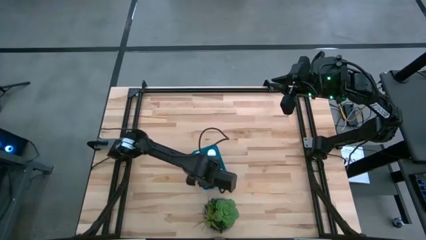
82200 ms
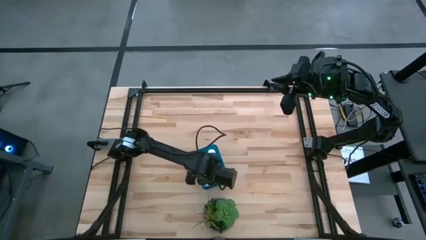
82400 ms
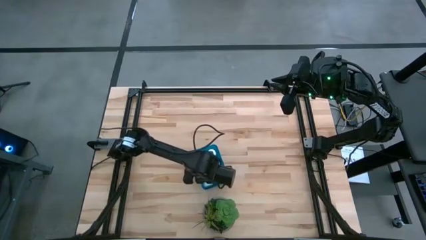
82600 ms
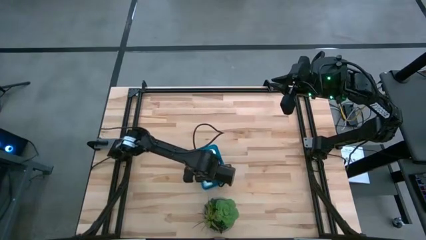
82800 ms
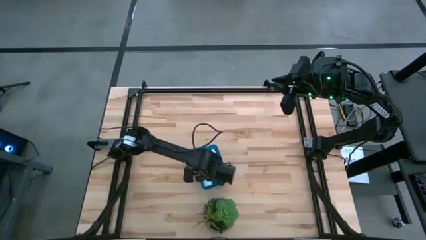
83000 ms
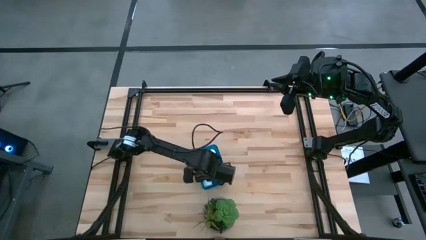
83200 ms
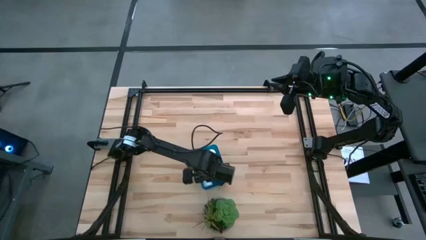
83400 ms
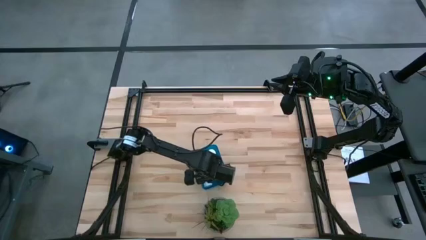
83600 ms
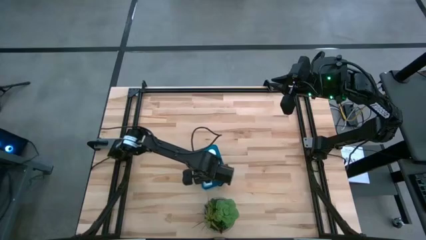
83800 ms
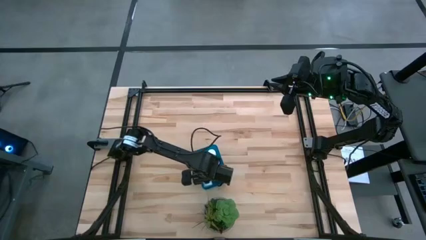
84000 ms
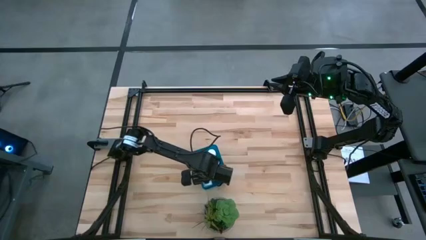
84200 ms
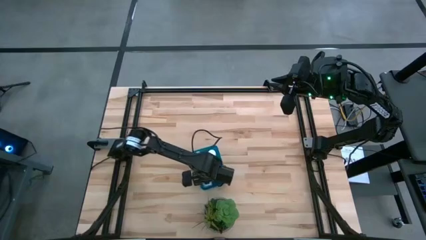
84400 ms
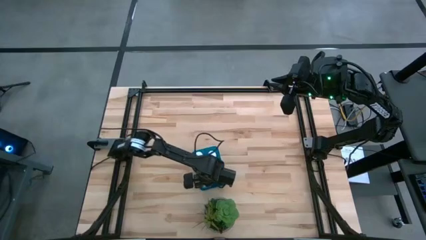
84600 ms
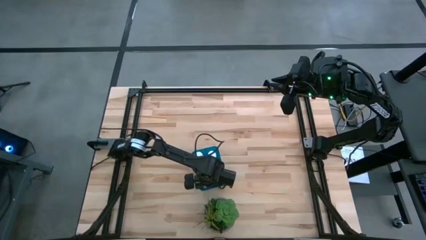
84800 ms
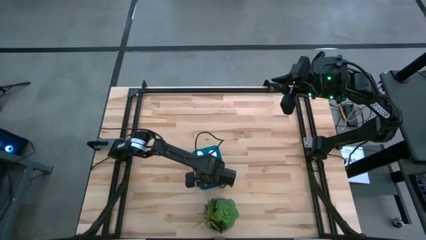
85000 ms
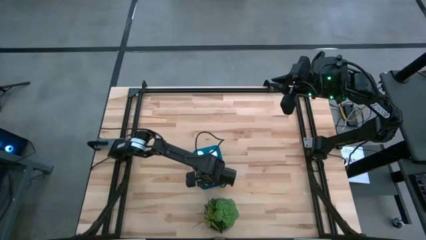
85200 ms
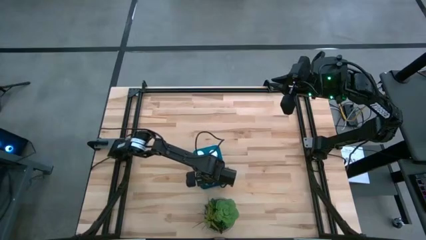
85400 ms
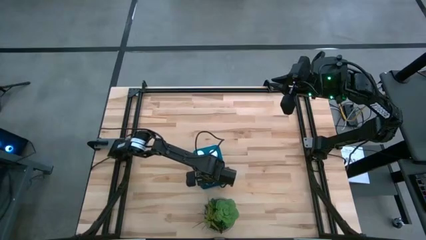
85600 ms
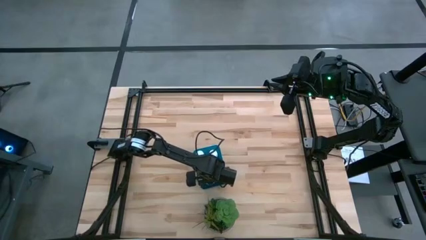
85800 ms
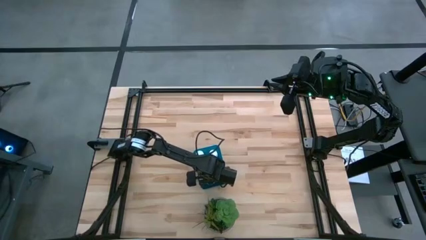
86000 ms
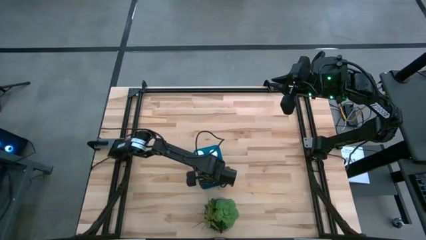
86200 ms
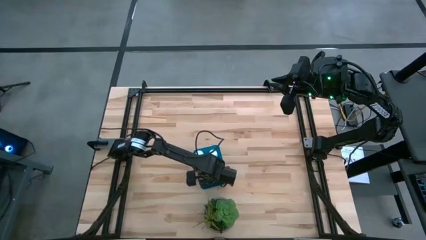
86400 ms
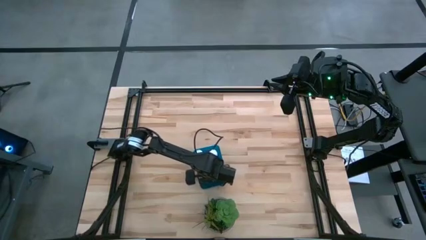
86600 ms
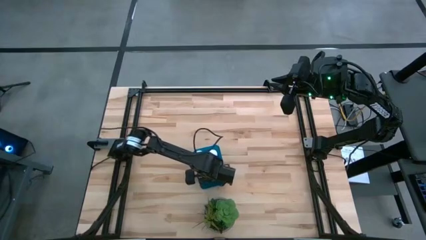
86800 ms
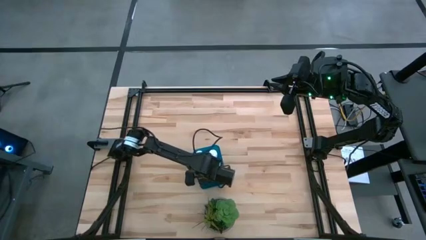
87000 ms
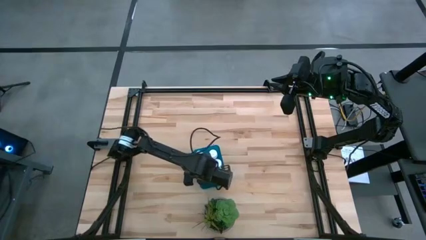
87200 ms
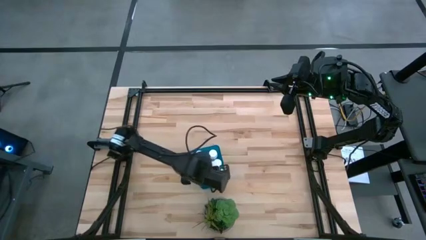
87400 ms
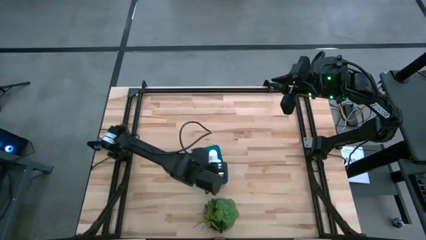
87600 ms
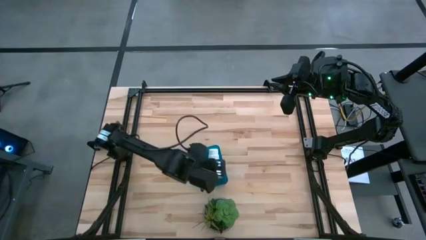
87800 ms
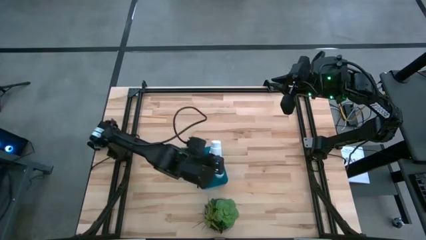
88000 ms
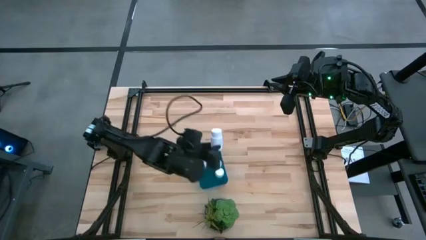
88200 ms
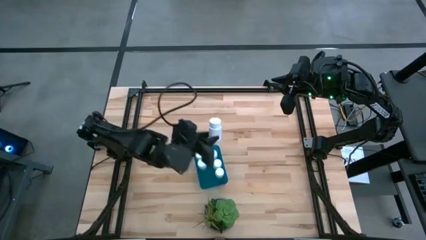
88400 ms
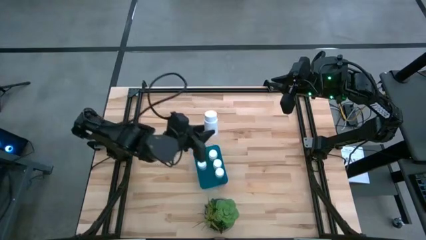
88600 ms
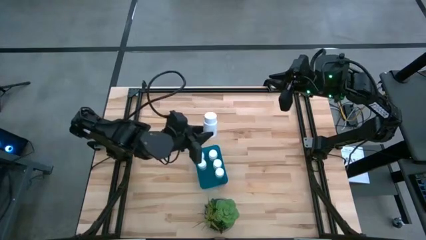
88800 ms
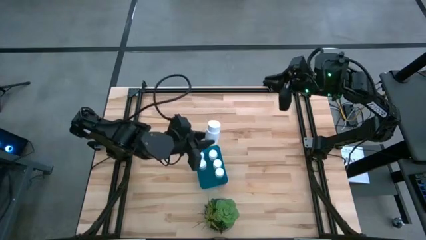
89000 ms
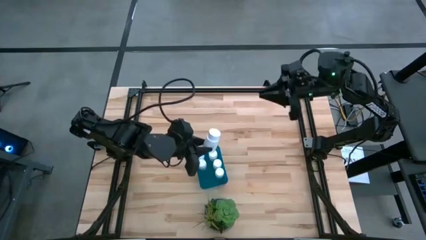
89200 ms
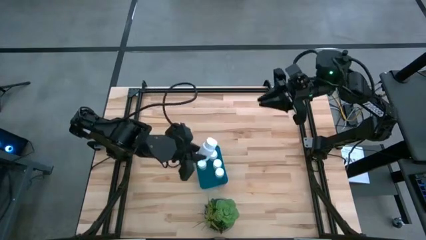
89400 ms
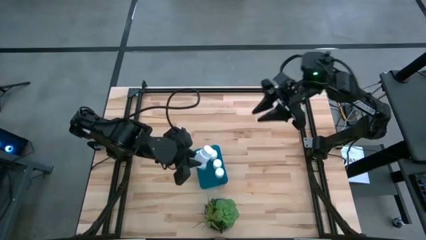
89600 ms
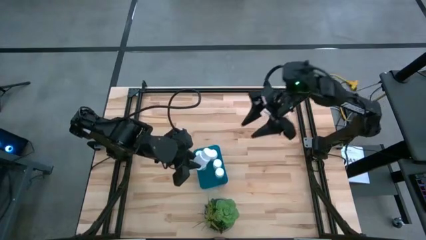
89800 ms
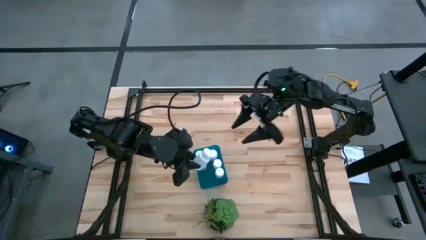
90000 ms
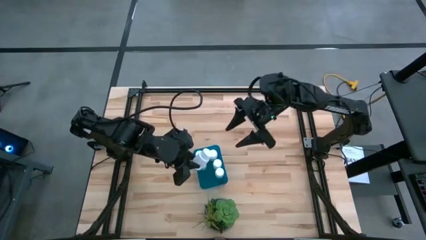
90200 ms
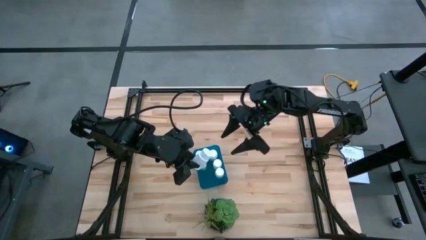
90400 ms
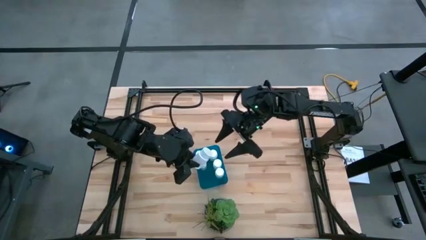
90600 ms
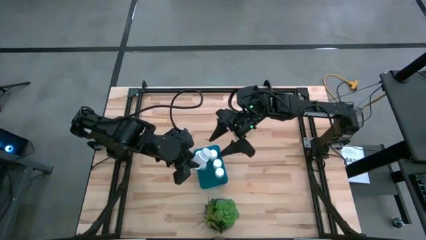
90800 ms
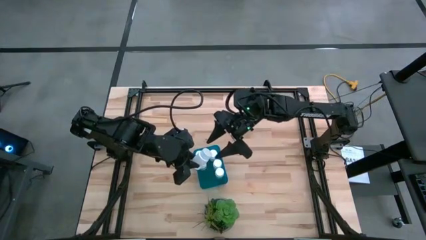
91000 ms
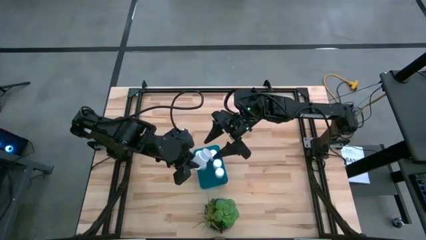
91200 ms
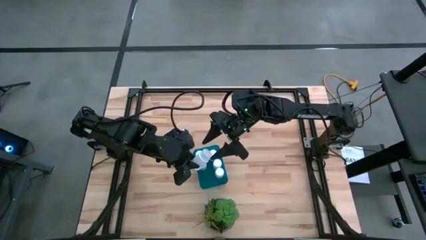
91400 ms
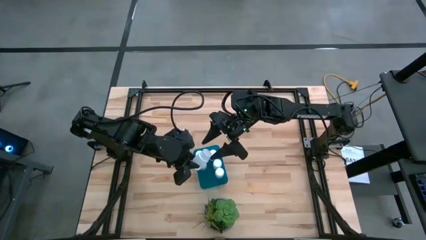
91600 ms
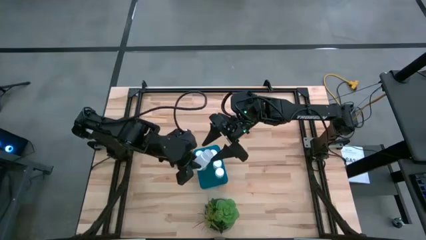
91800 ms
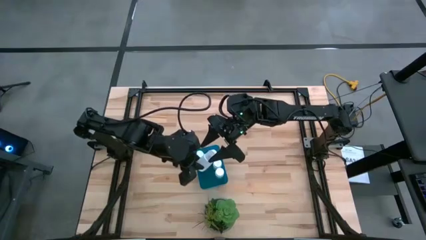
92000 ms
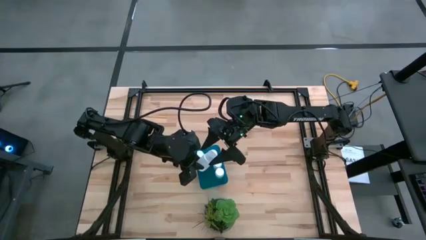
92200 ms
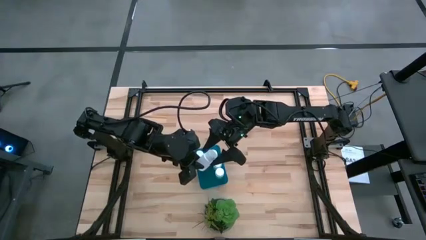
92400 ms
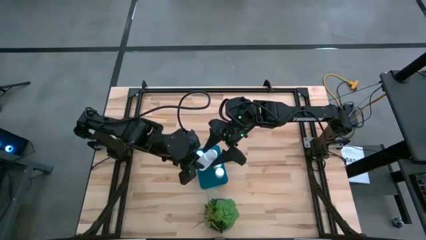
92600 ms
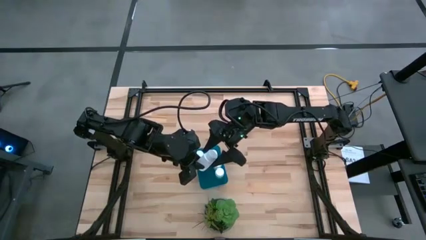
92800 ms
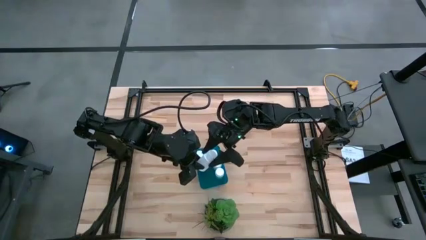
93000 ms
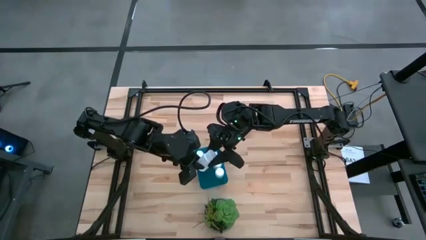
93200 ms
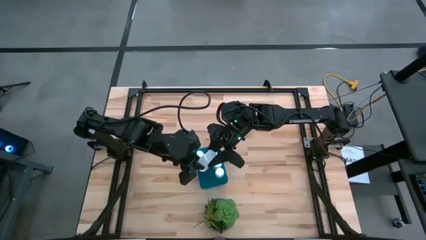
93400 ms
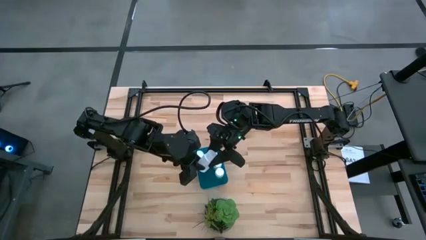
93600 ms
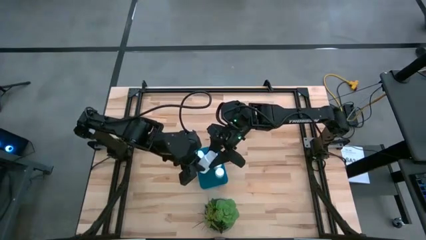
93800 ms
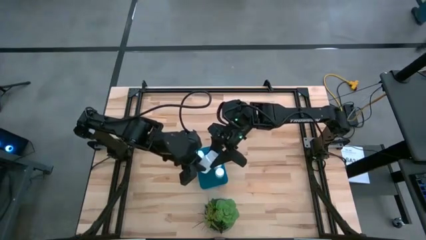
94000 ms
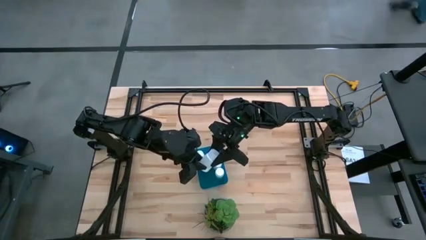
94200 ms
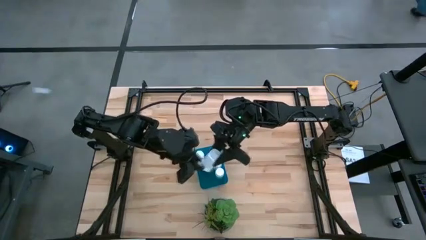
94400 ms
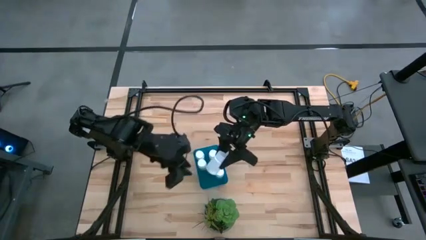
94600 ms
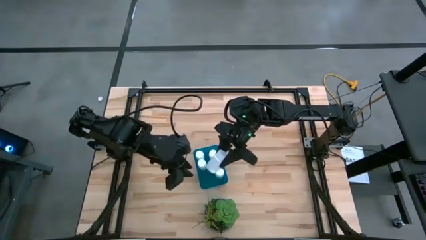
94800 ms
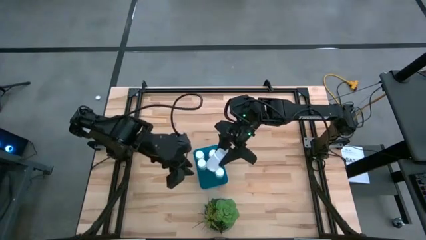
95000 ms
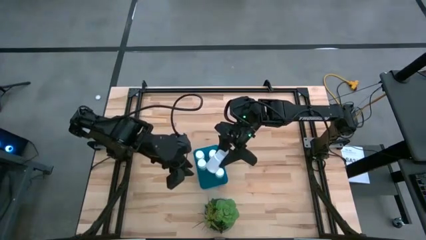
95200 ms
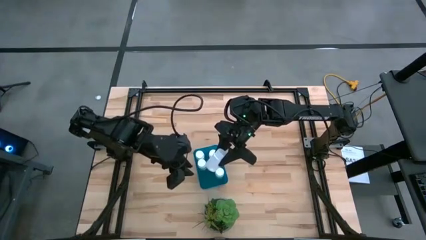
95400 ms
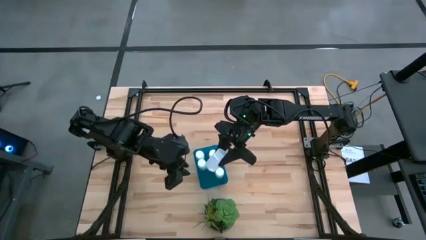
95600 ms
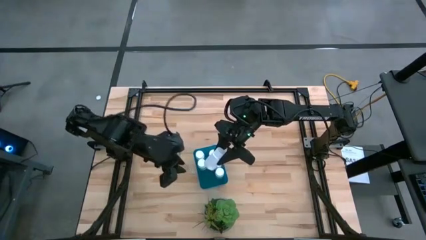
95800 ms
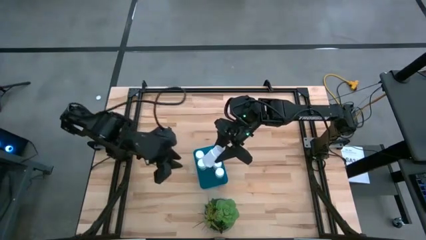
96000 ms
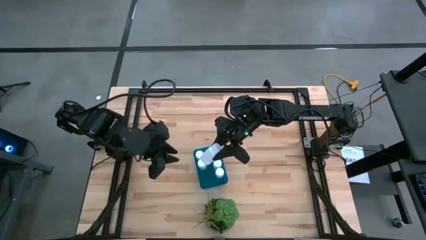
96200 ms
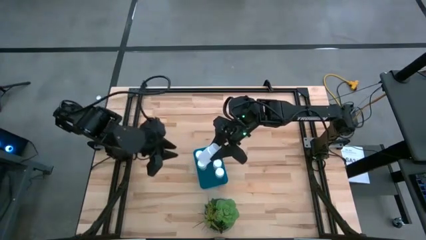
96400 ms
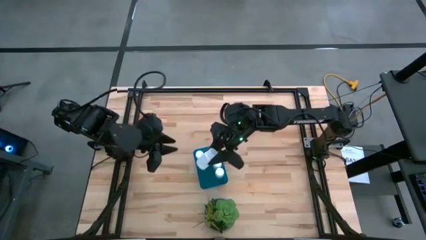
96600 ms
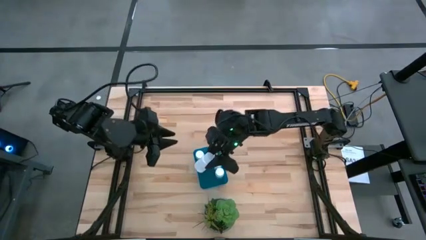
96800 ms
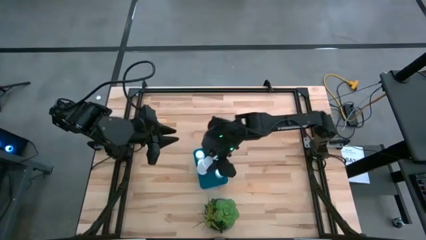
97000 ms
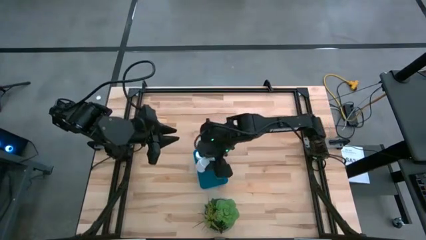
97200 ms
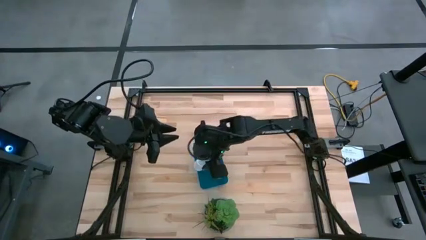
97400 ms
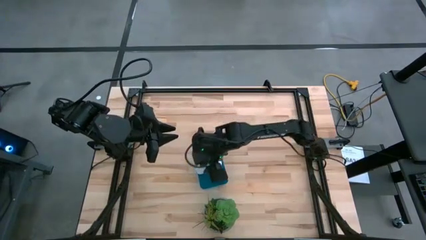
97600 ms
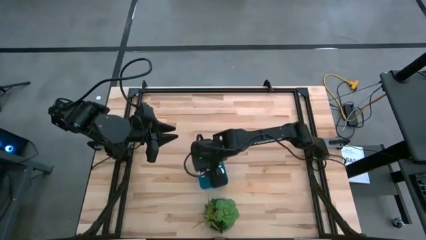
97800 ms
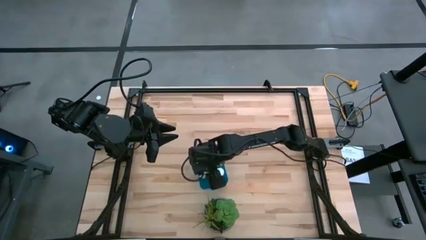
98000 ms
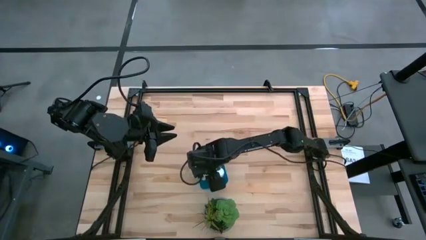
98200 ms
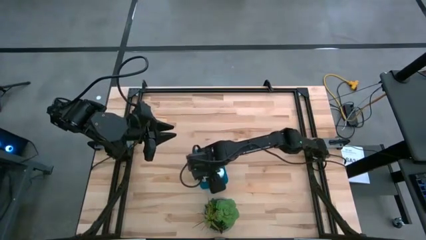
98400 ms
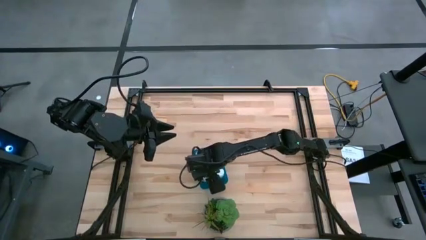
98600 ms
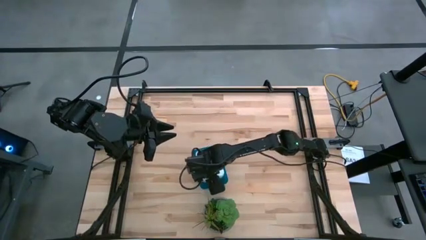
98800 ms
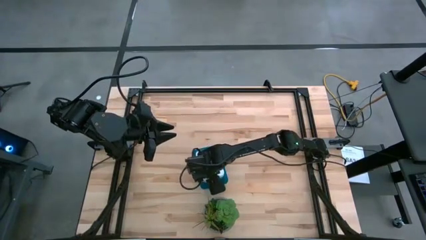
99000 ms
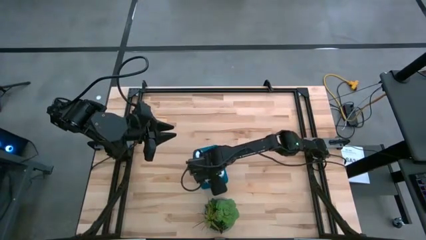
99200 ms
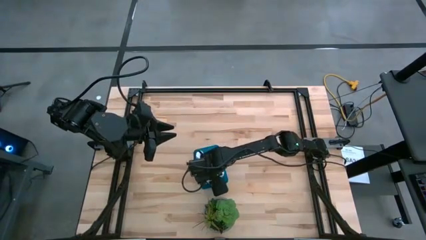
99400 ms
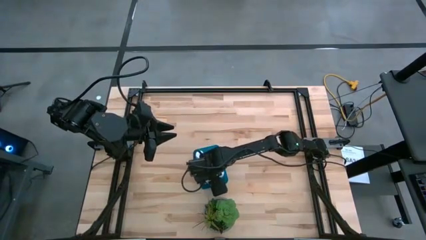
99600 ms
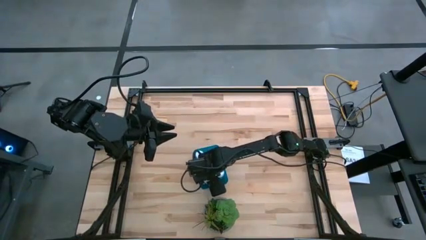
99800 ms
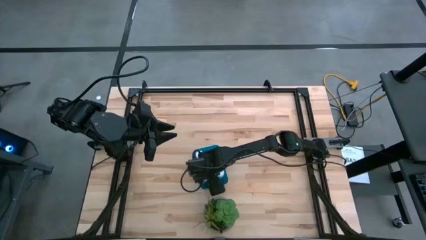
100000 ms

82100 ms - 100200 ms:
Task: Pick and place pill bottles into a basket
Put the medicine bottle into the container
